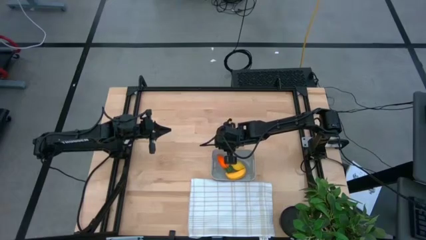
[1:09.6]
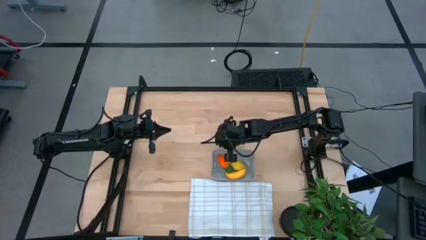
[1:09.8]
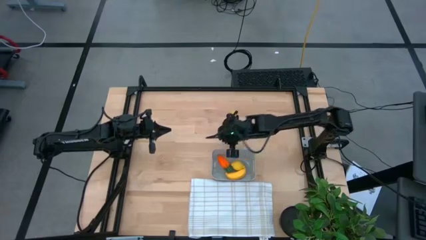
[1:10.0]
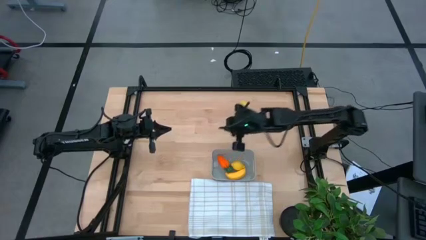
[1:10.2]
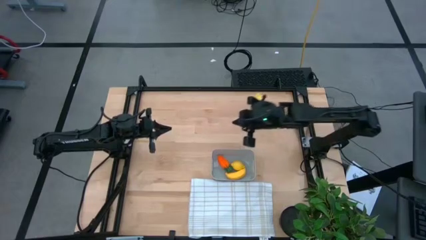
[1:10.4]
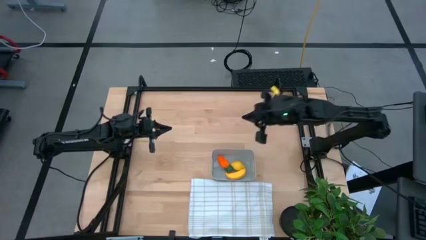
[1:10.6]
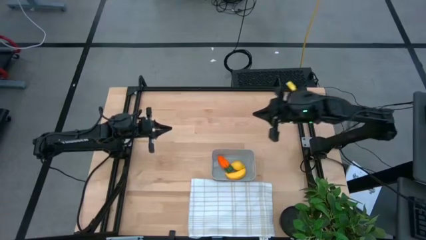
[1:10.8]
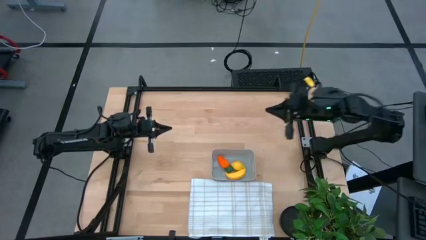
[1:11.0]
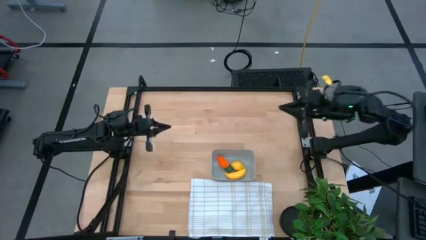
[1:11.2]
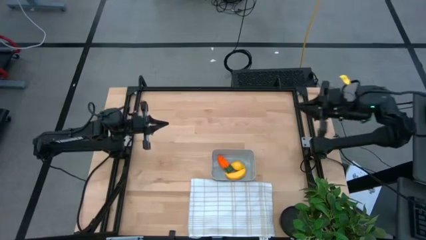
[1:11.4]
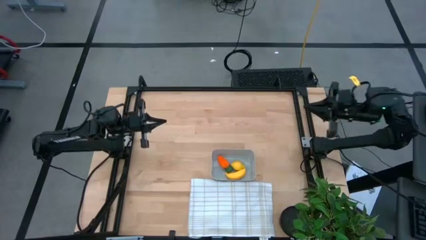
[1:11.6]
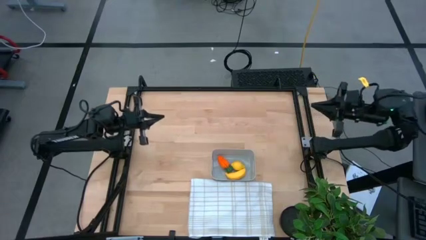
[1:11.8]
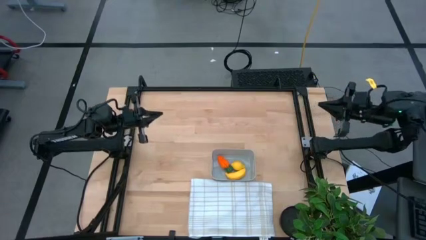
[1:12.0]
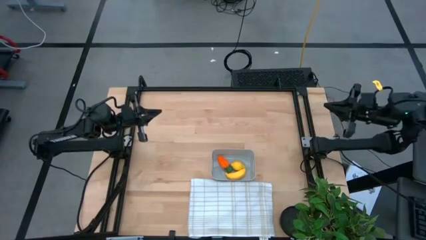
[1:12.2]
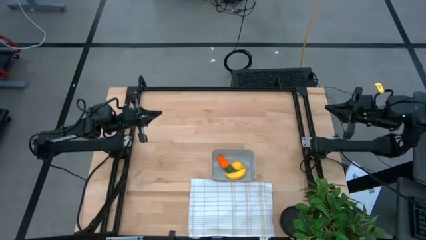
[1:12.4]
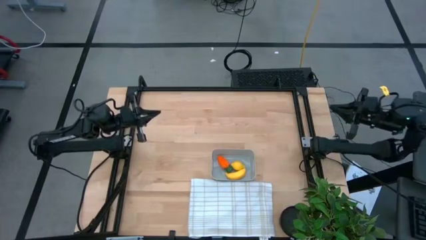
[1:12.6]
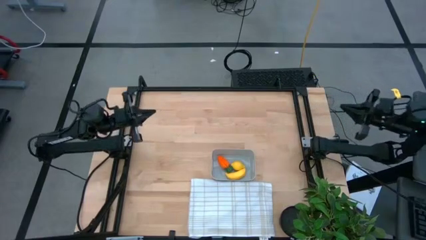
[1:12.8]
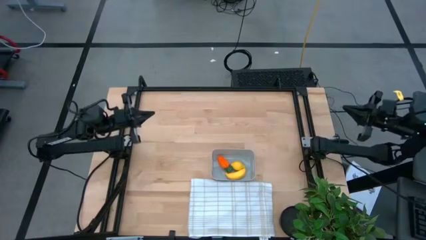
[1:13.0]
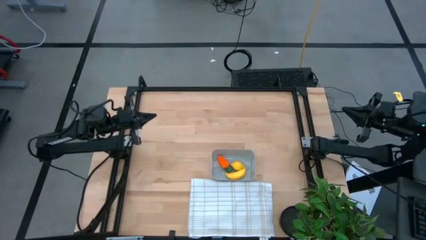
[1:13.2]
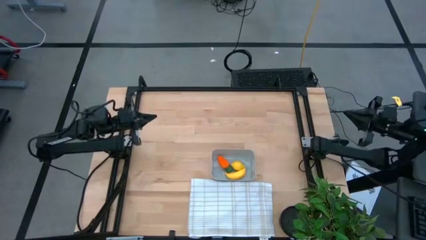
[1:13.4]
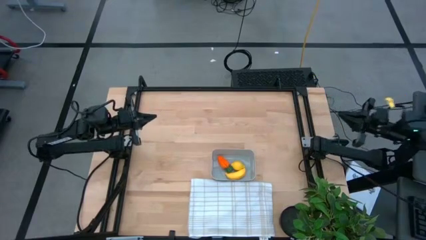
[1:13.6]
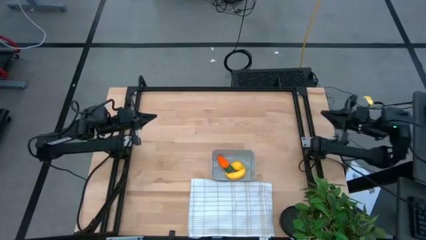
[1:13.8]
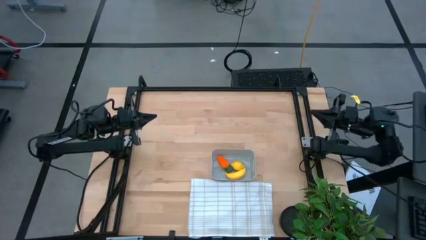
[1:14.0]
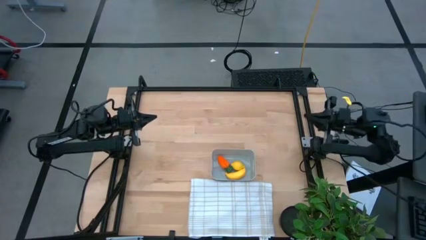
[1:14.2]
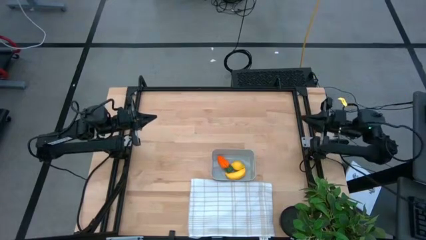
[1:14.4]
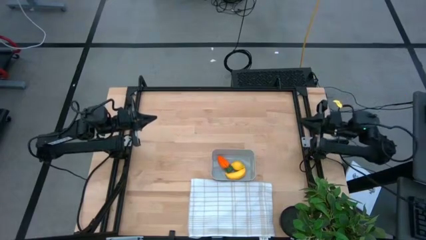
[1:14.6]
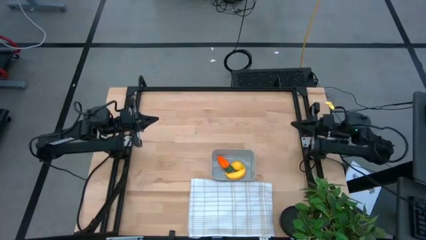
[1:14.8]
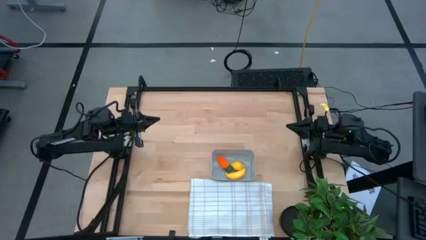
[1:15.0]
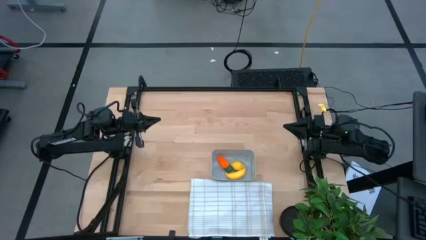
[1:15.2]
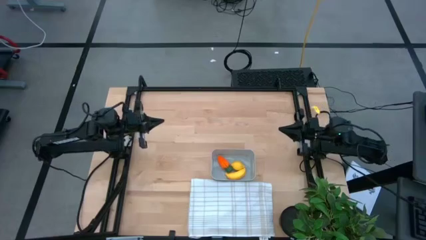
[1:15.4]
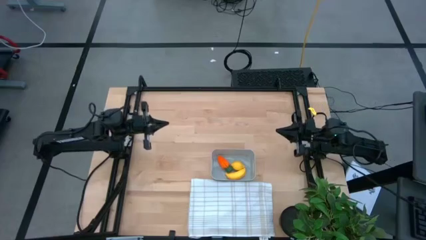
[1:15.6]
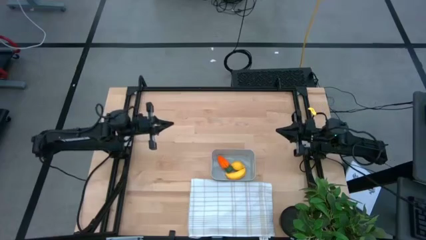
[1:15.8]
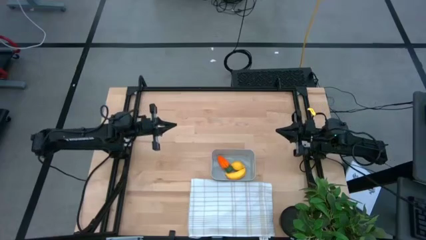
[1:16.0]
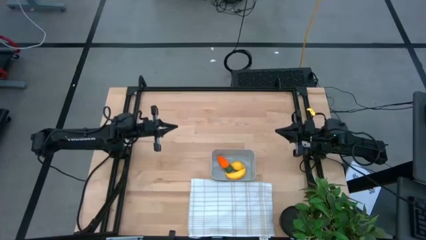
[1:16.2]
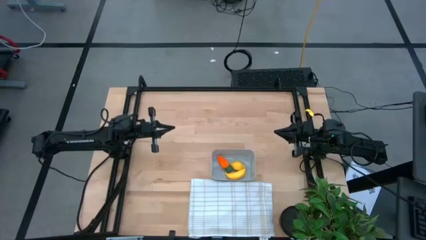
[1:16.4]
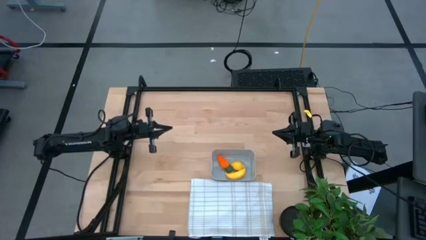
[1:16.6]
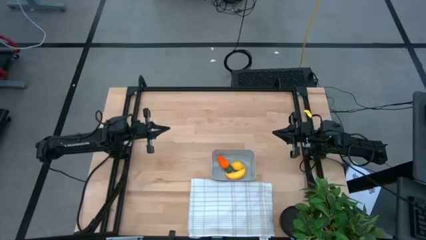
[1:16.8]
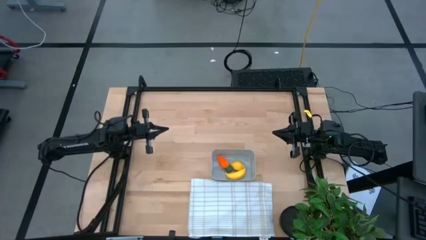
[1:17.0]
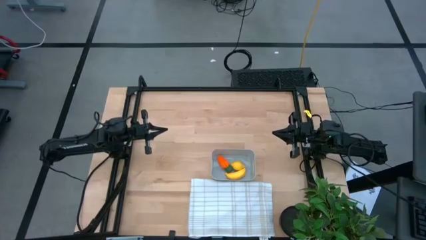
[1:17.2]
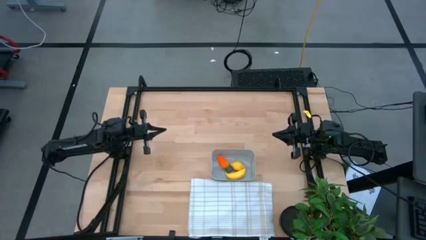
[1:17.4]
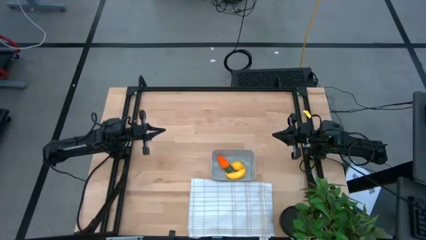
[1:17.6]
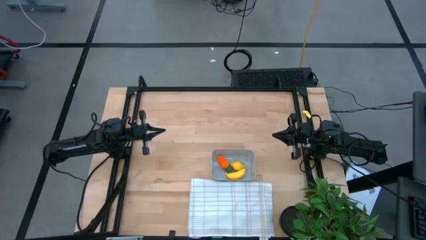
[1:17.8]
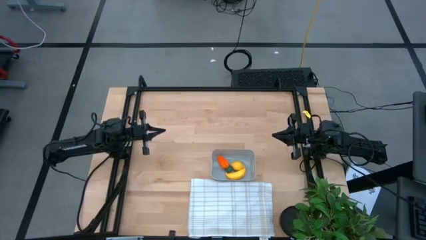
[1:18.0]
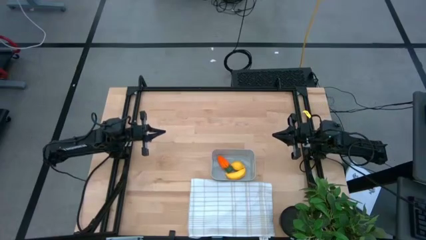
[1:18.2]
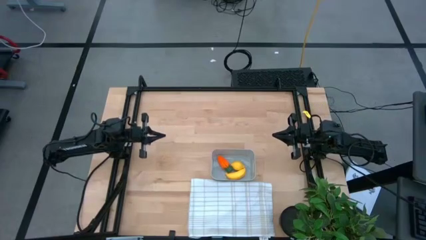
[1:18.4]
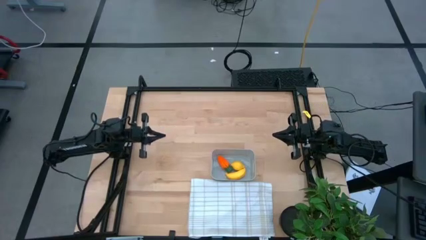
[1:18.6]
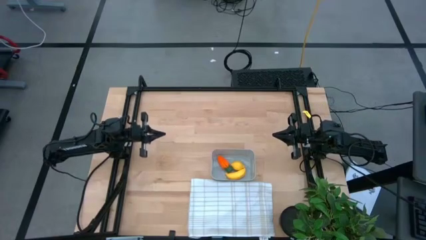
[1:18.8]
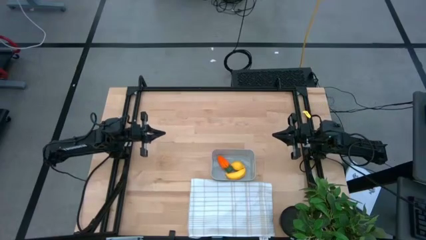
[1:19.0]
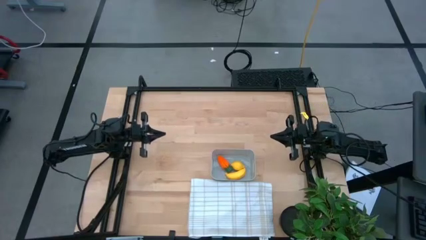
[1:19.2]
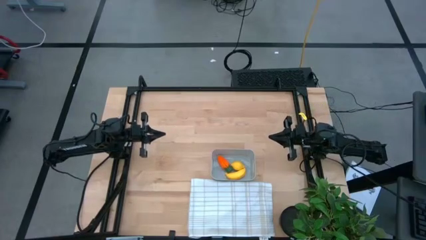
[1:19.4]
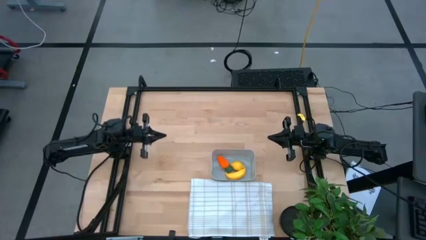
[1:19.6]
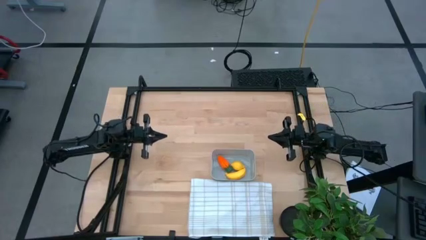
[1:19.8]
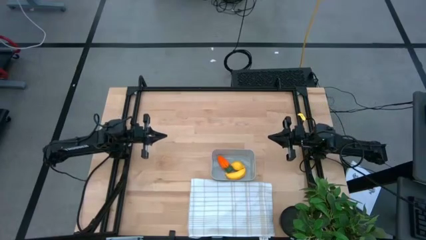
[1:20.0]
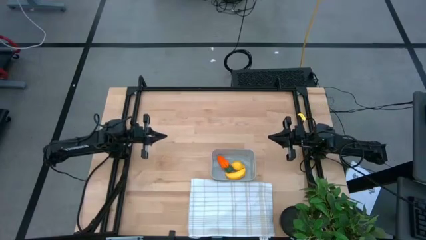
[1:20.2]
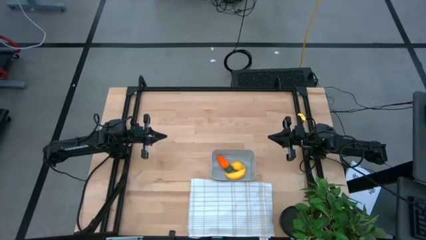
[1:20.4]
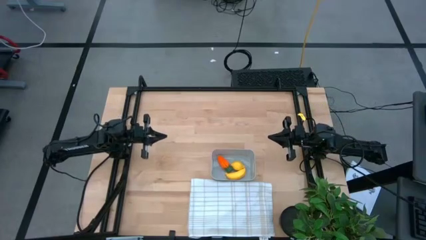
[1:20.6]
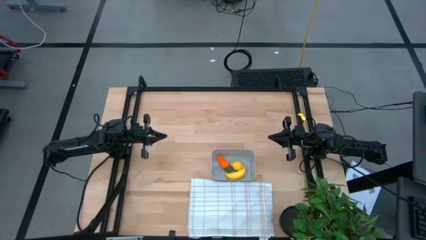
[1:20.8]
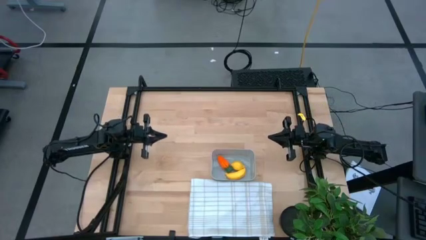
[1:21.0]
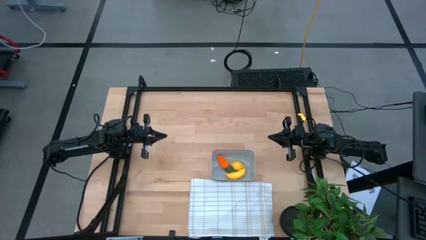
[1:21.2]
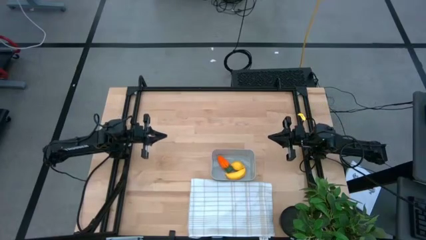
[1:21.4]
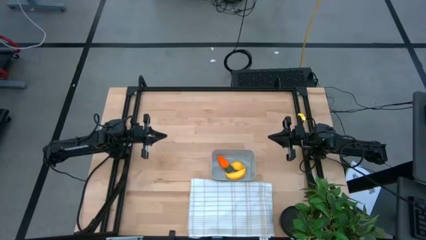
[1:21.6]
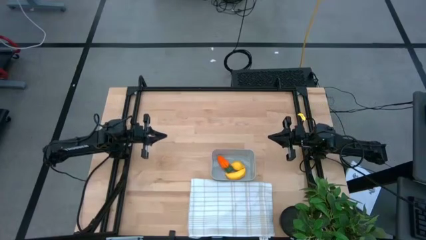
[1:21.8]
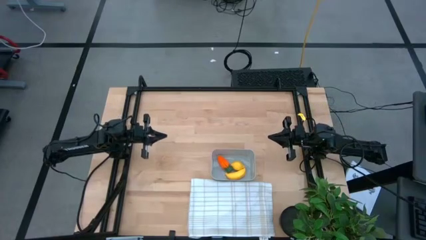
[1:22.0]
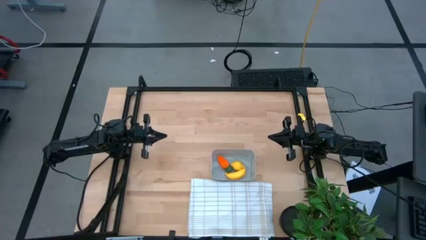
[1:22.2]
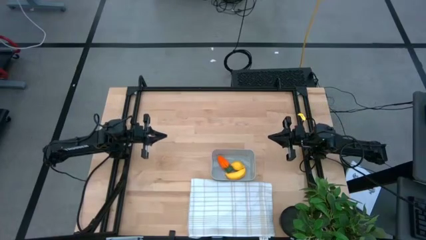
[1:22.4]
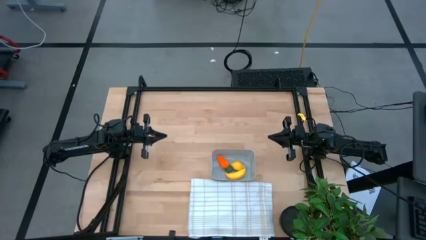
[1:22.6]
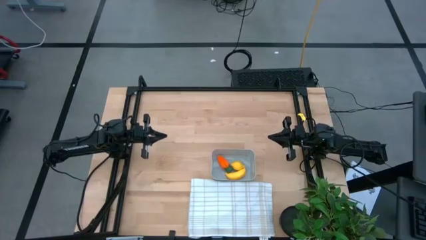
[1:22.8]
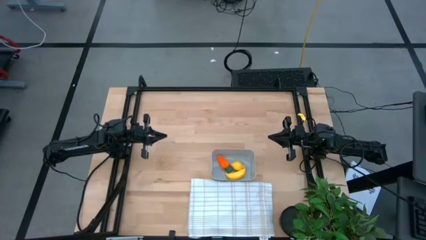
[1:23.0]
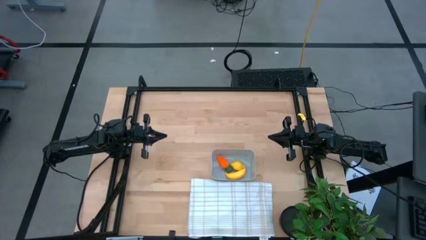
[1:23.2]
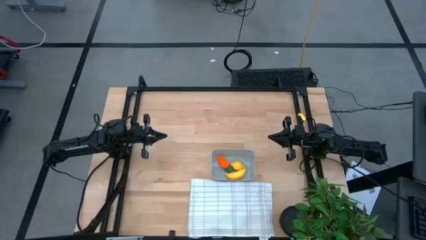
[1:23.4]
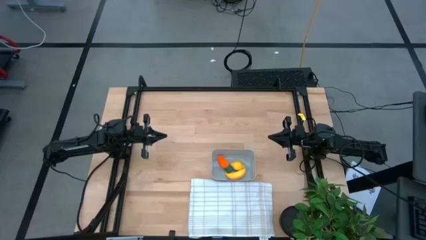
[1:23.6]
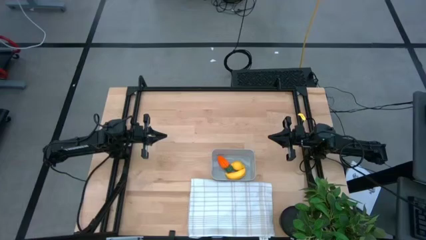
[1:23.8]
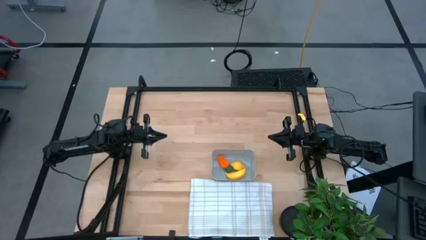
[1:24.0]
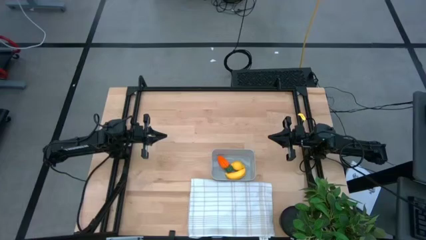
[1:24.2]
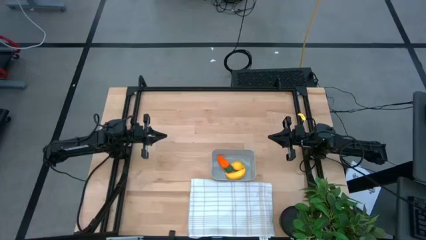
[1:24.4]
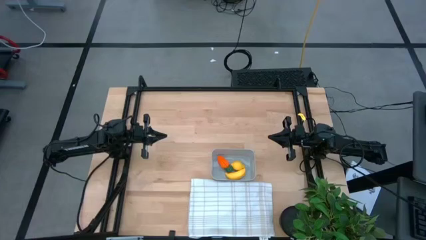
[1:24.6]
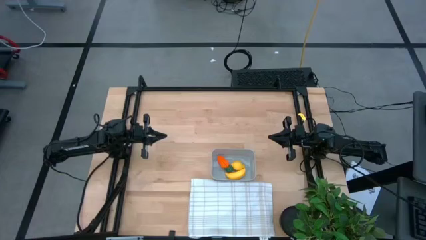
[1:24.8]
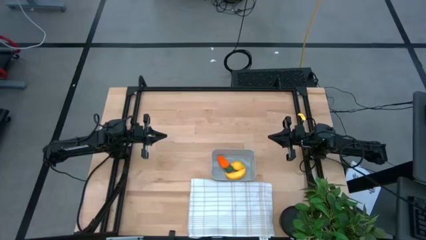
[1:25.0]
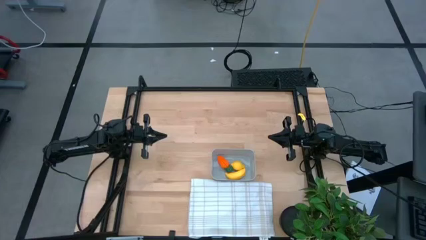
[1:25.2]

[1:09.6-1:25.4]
Task: Pick and placing Produce into tupperware
Return to Home Position

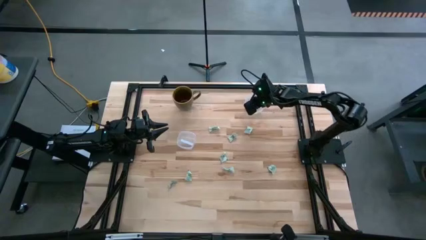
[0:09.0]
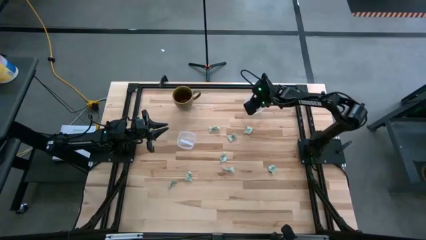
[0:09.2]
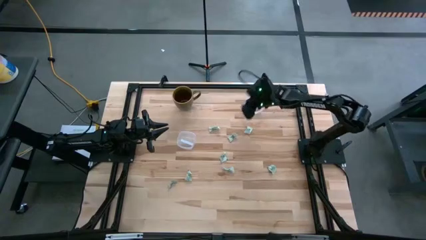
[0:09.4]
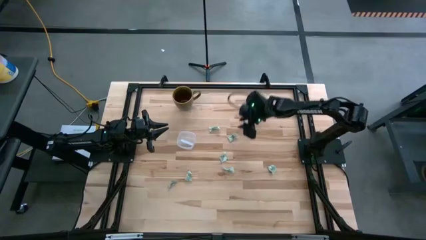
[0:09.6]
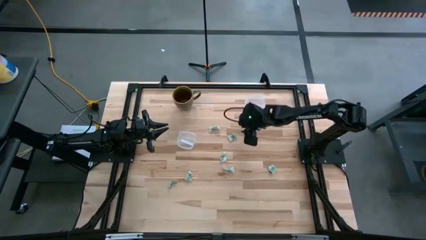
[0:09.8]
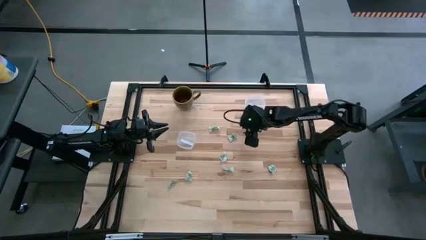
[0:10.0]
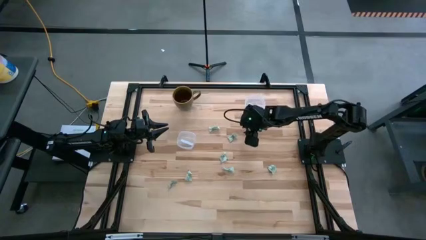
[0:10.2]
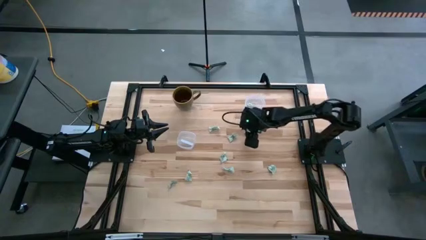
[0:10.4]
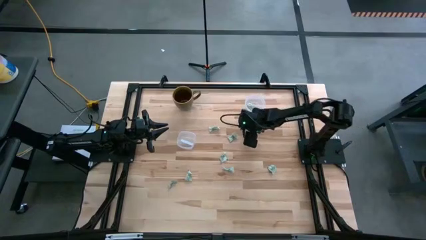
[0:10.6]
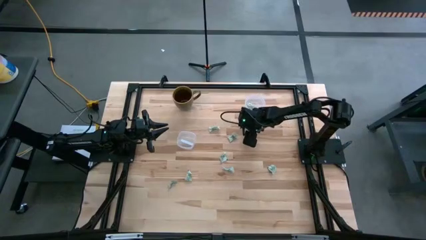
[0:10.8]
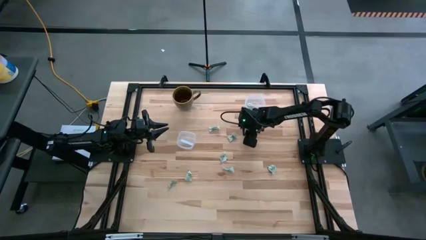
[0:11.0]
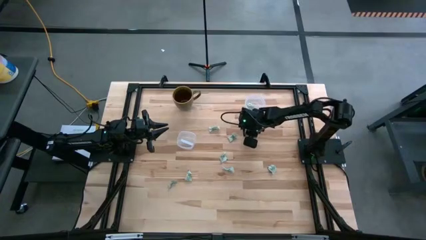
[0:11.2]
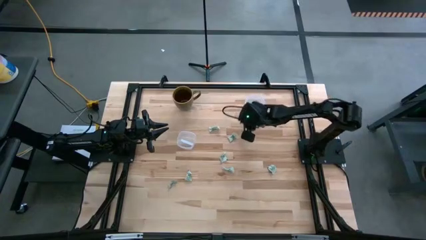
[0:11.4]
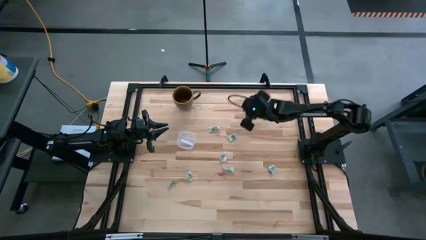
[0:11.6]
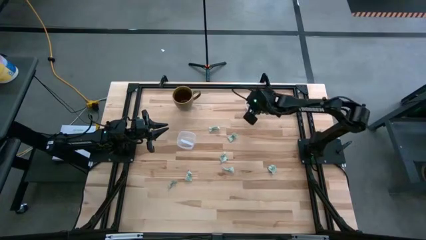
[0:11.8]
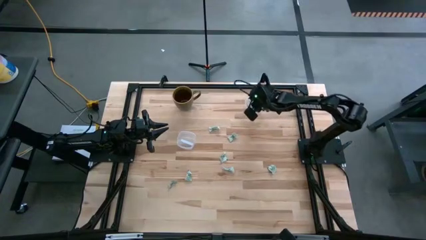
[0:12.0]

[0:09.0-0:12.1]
Task: Pick and place Stevia / Truvia into bins
Put the stevia packet into the top container
